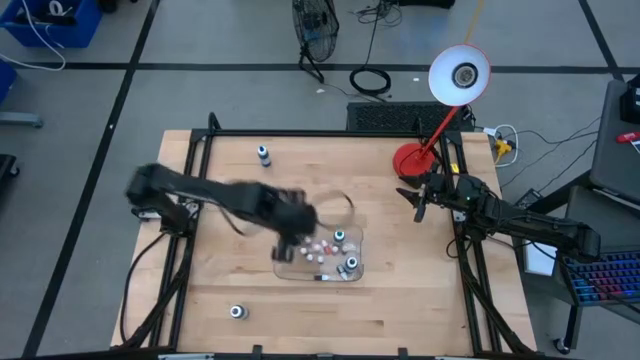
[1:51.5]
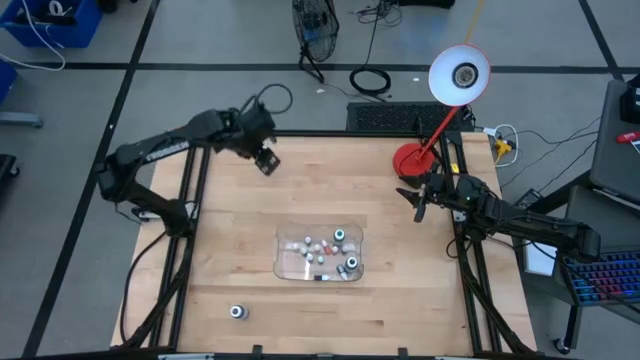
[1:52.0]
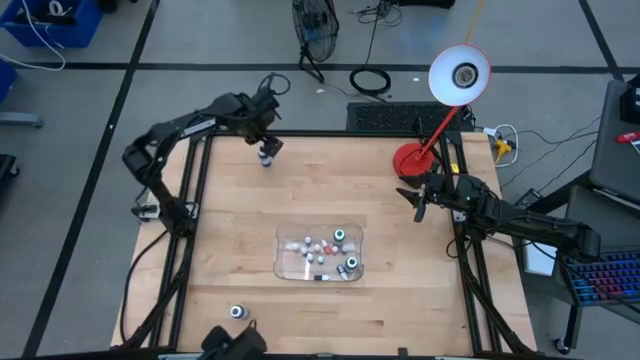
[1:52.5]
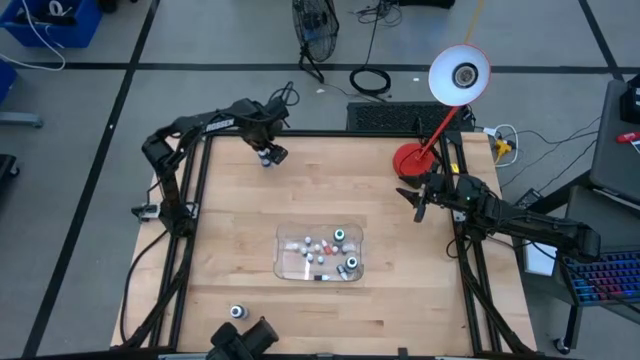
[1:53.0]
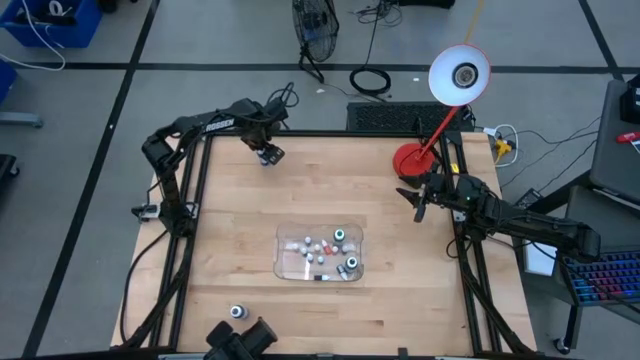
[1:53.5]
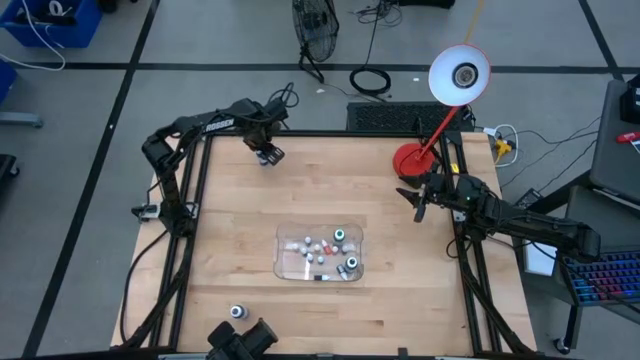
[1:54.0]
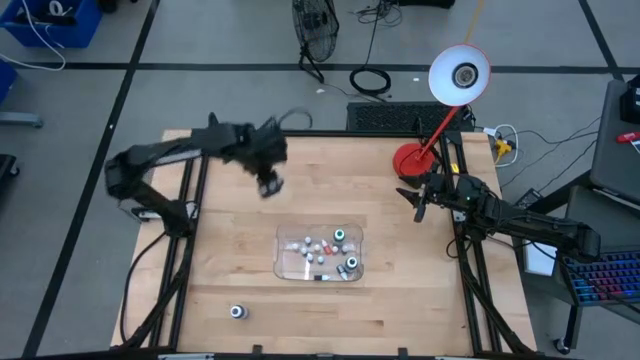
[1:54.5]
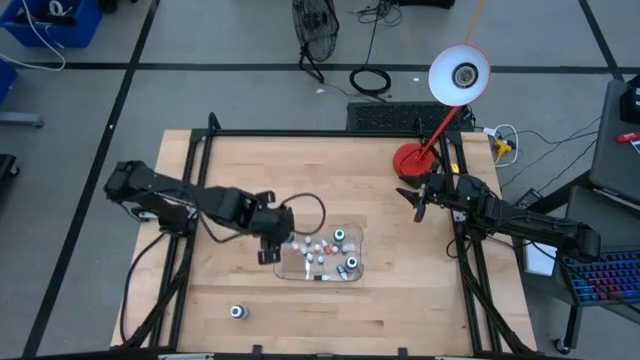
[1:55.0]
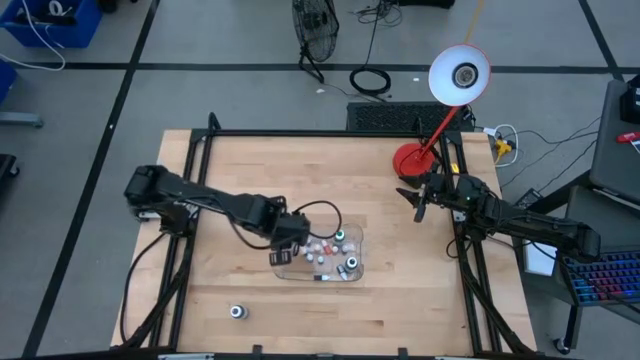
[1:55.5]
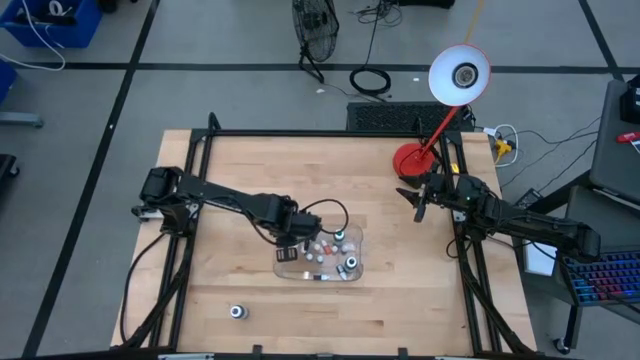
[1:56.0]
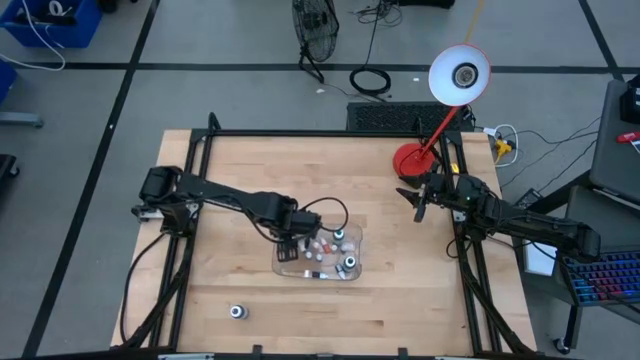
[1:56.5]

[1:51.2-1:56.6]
Task: Pick & Place food coloring
Put the large blue food coloring bottle into the transparent bin

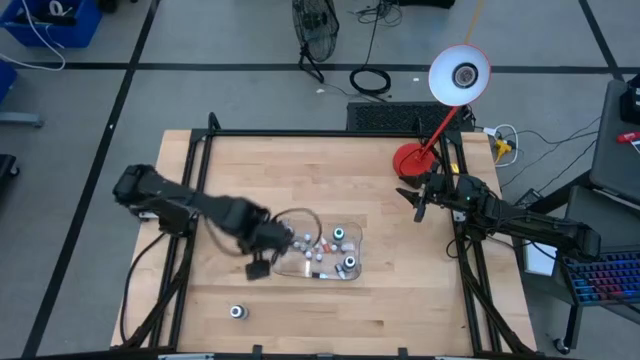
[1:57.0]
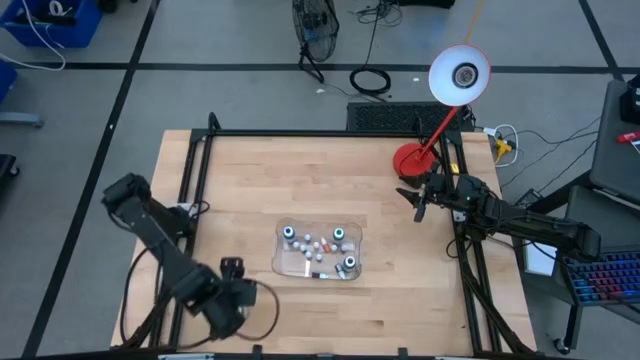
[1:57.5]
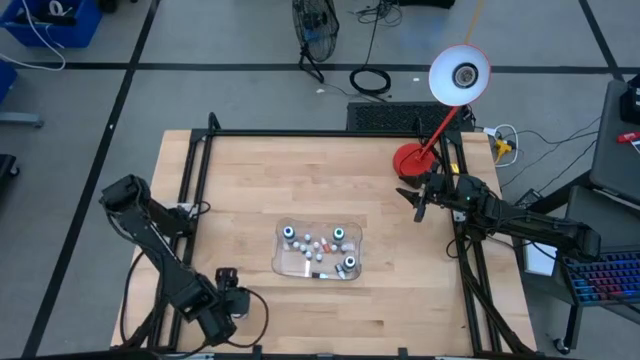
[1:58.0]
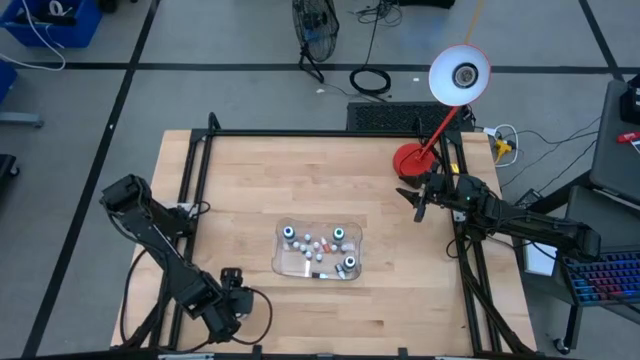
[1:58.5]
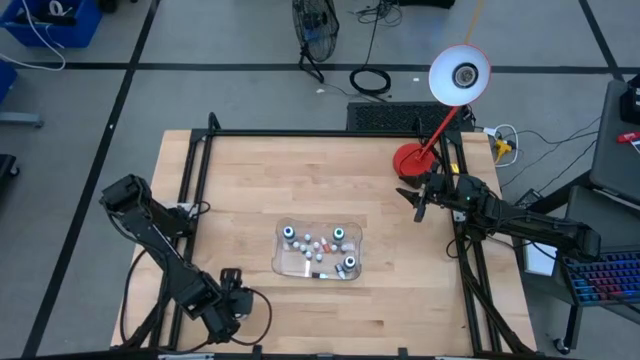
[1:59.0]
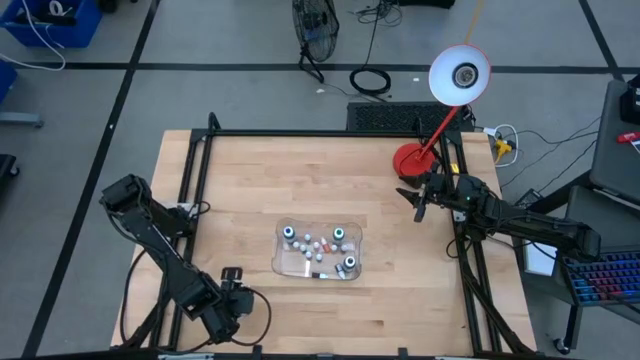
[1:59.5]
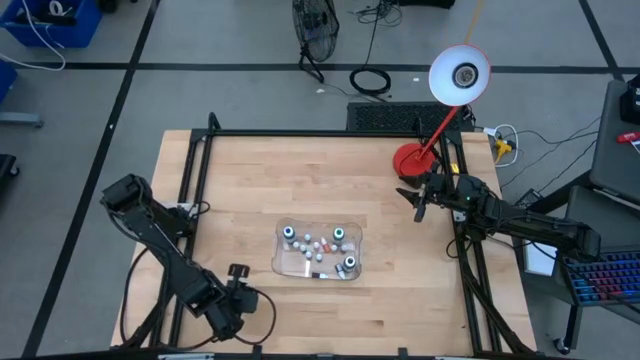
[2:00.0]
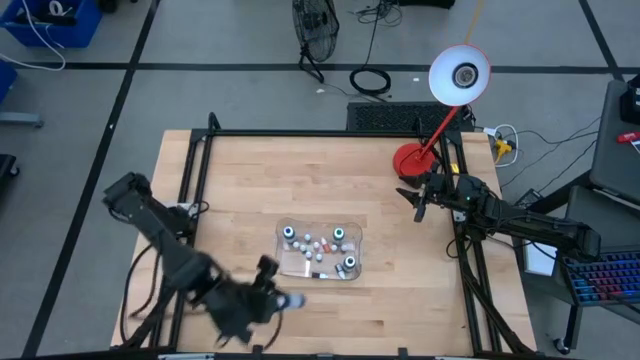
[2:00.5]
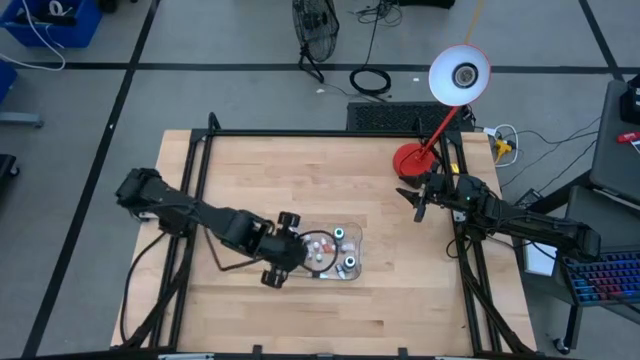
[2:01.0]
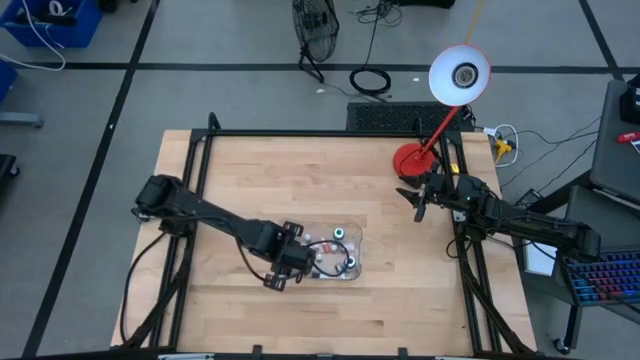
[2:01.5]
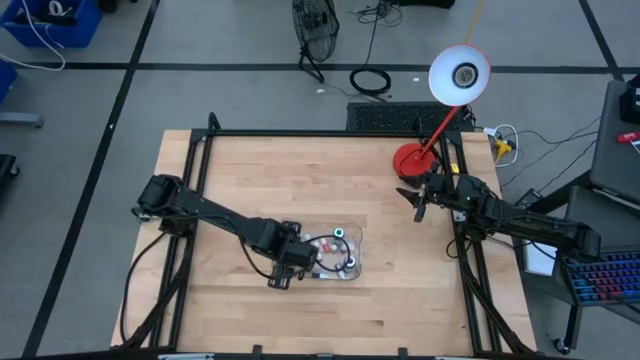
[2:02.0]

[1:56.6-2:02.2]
Put the large violet food coloring bottle into the transparent bin

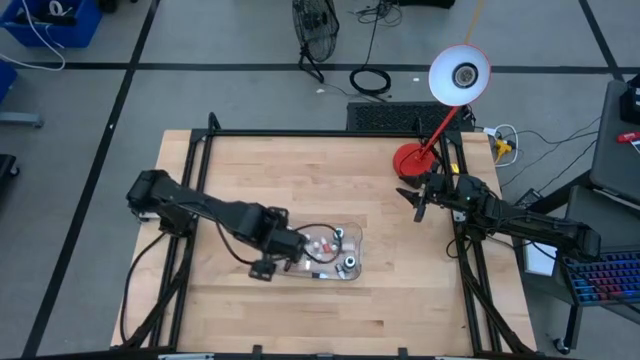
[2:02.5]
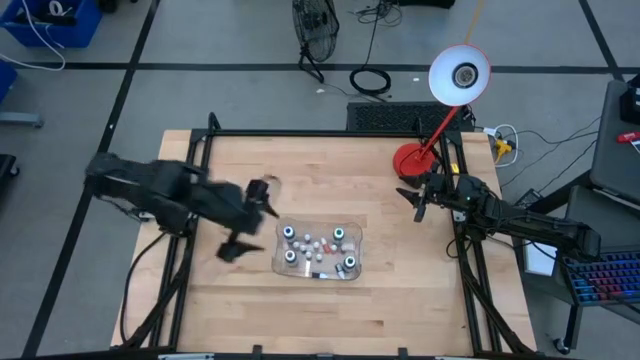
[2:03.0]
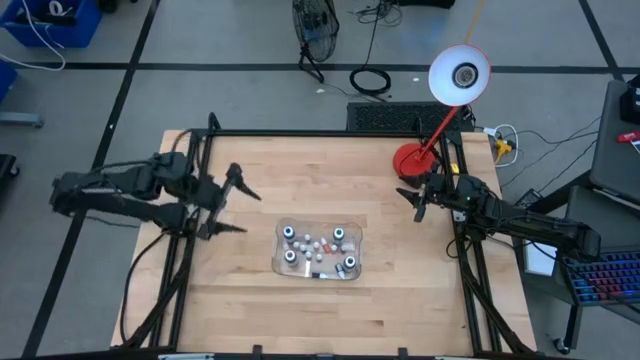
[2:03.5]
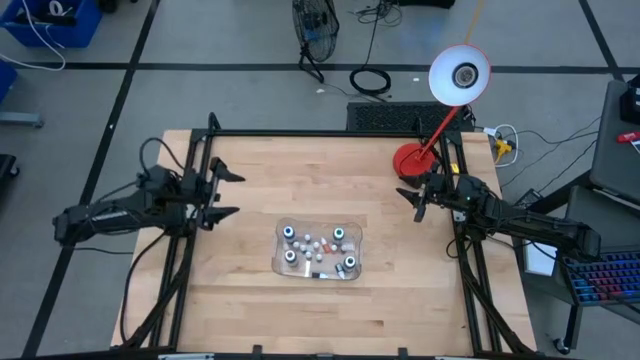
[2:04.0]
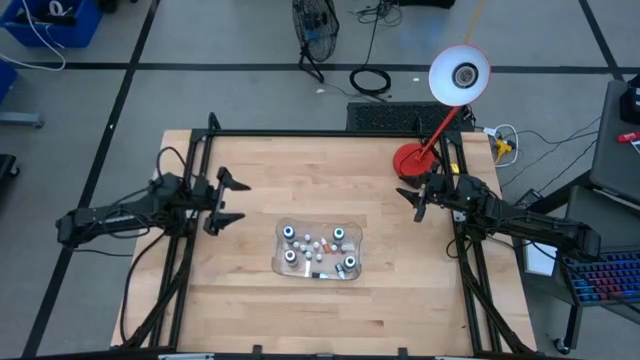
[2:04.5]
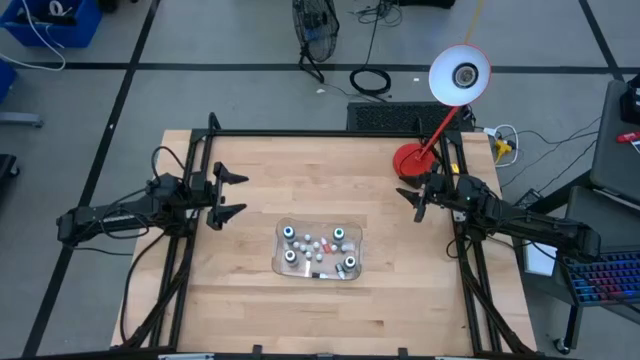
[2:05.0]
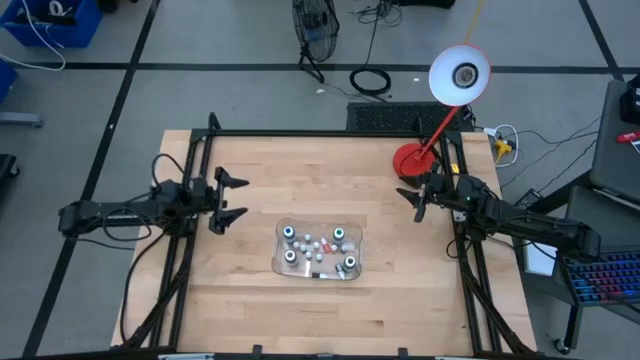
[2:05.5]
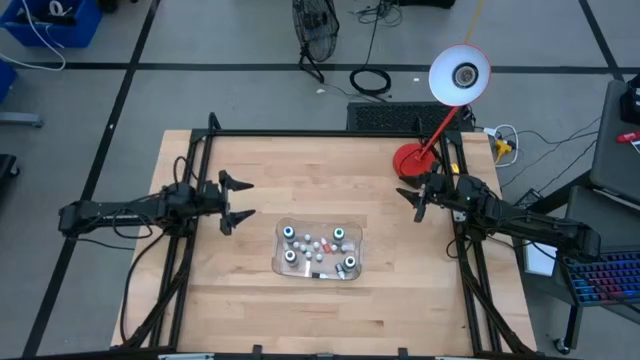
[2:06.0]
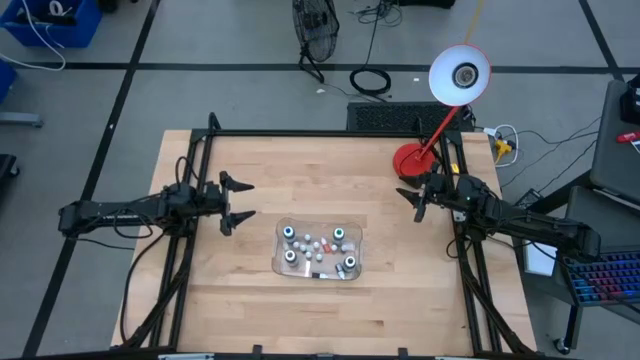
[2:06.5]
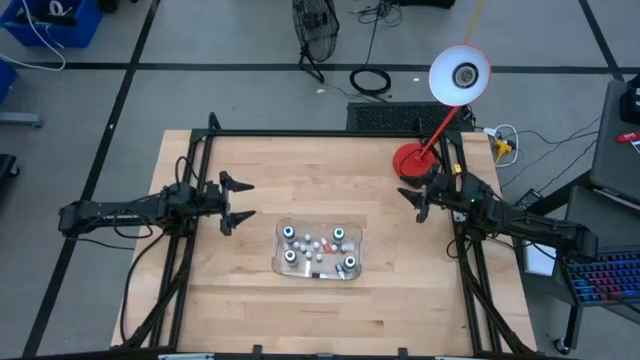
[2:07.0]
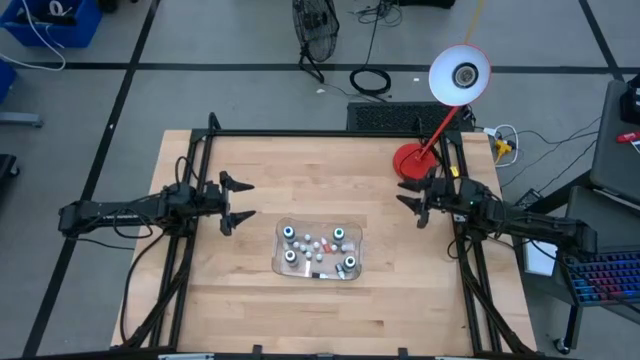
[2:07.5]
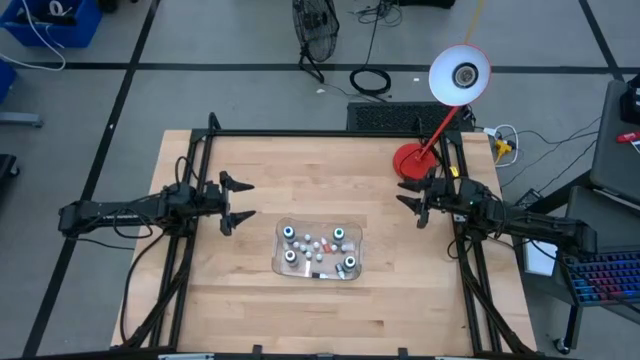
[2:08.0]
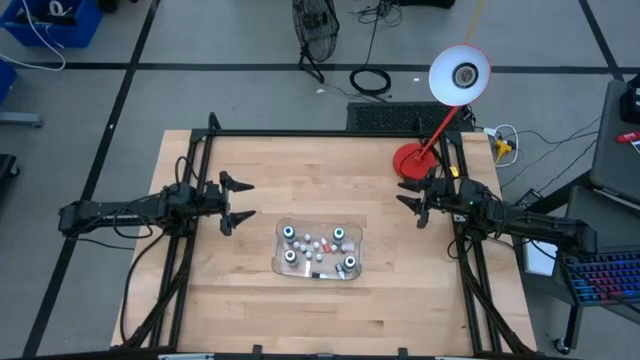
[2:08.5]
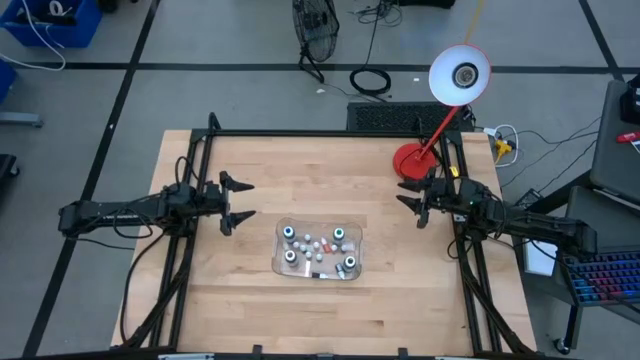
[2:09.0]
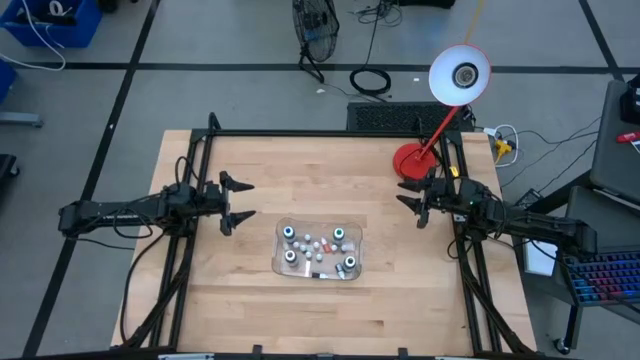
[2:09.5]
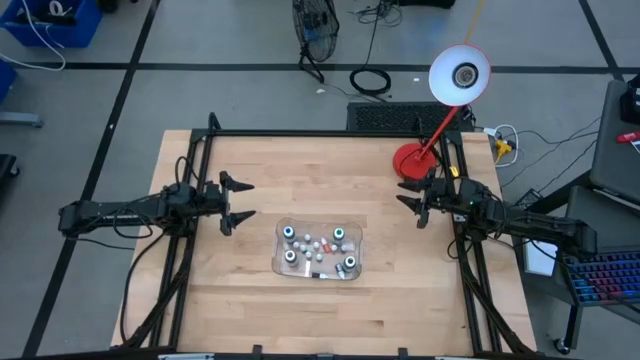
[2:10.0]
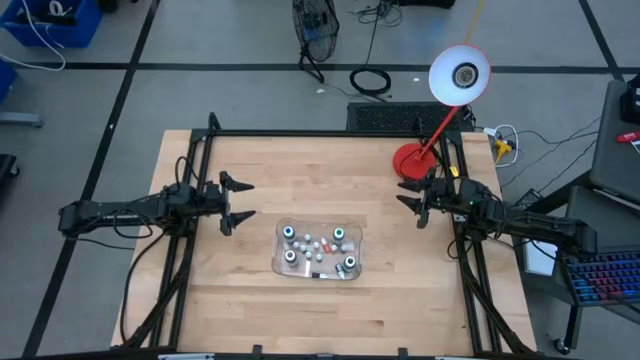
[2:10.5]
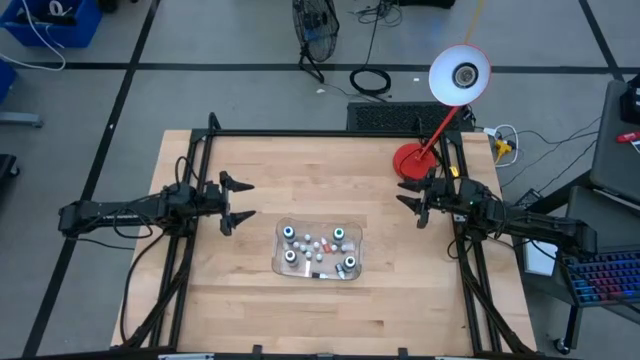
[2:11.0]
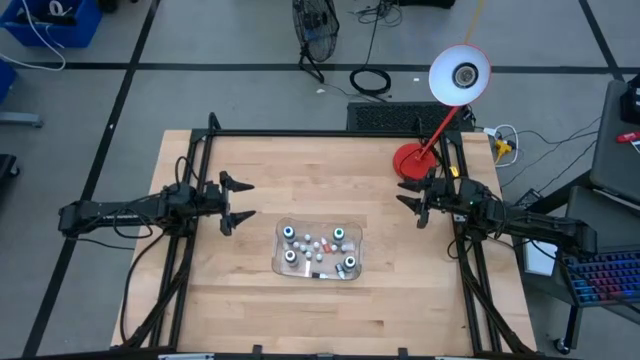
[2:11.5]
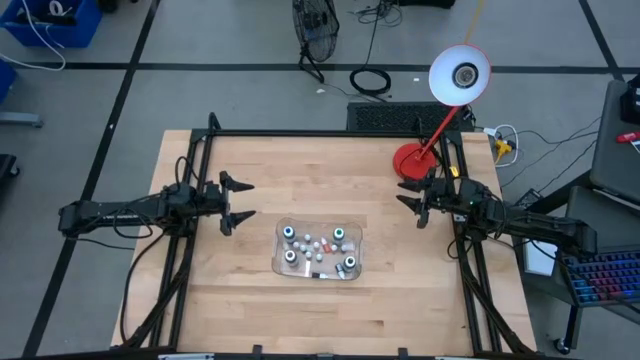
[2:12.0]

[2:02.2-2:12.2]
Return to Home Position
